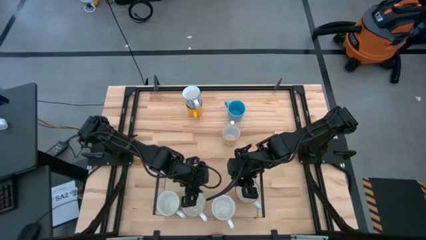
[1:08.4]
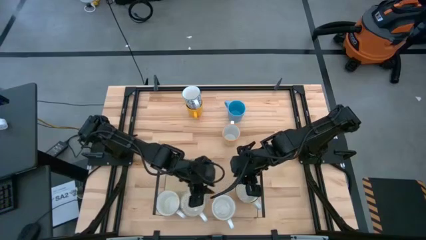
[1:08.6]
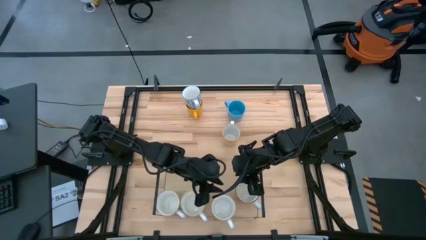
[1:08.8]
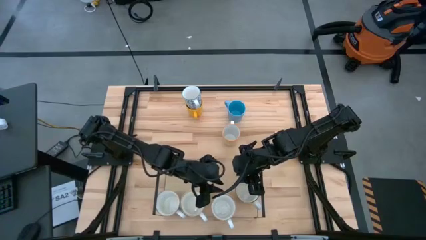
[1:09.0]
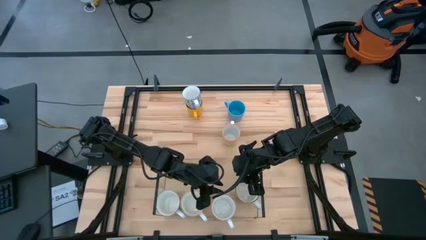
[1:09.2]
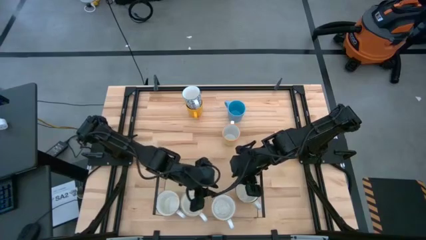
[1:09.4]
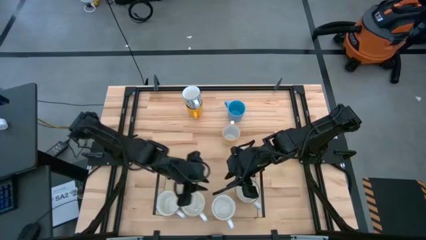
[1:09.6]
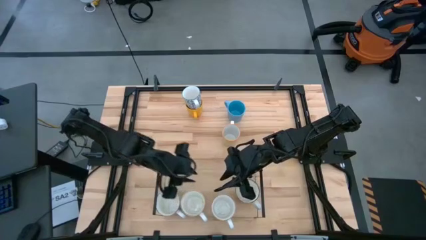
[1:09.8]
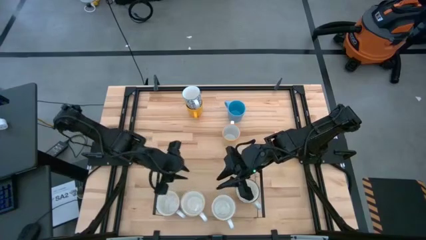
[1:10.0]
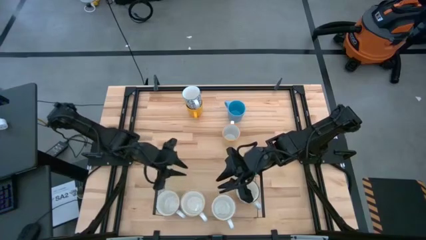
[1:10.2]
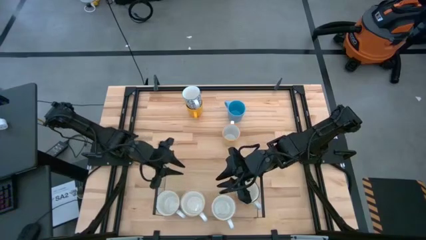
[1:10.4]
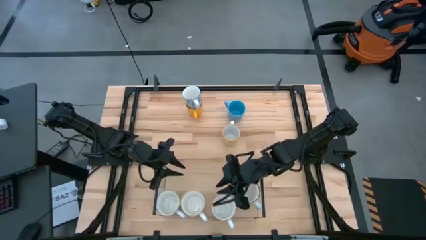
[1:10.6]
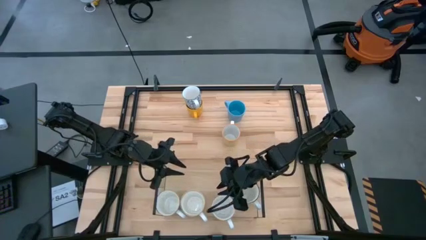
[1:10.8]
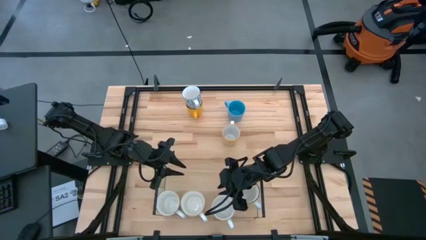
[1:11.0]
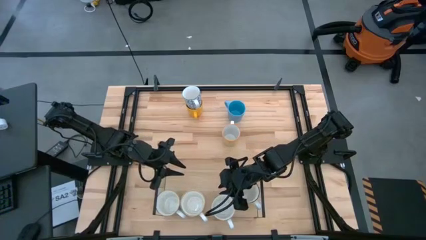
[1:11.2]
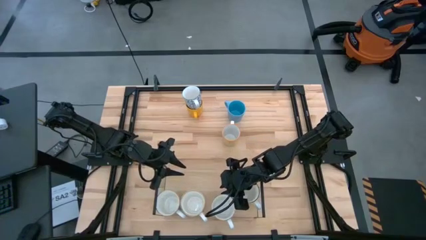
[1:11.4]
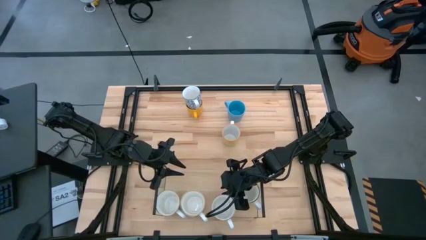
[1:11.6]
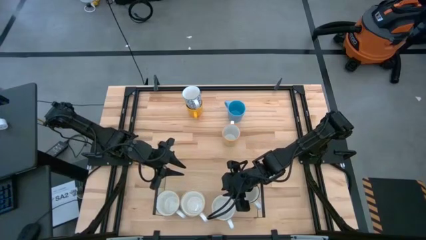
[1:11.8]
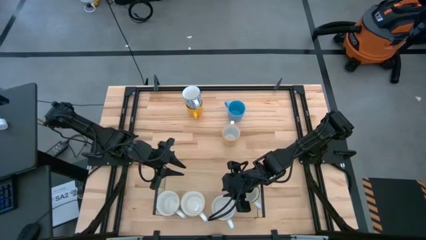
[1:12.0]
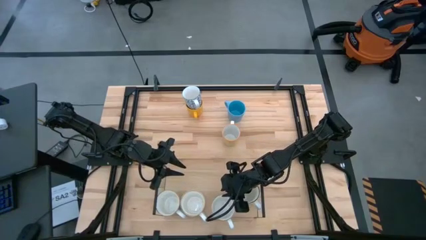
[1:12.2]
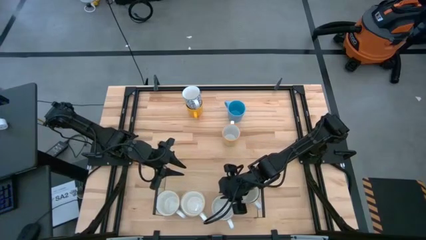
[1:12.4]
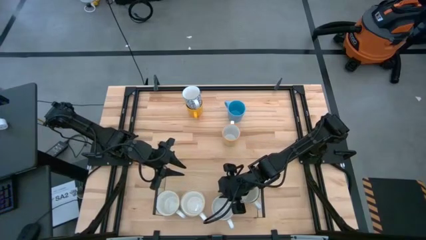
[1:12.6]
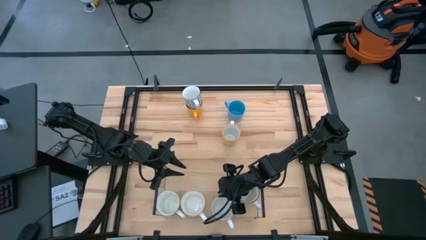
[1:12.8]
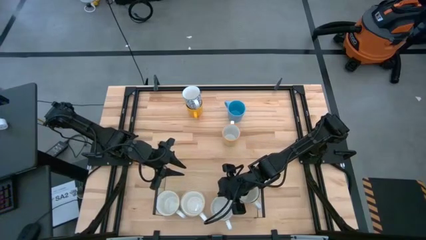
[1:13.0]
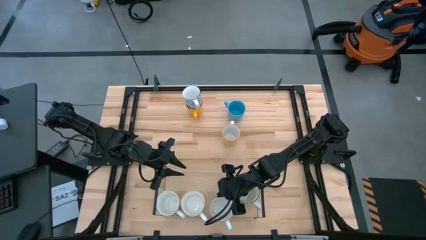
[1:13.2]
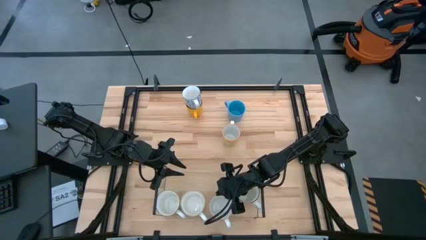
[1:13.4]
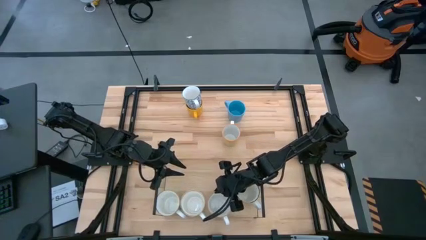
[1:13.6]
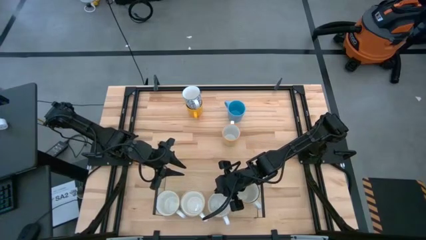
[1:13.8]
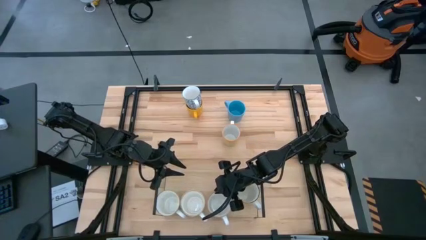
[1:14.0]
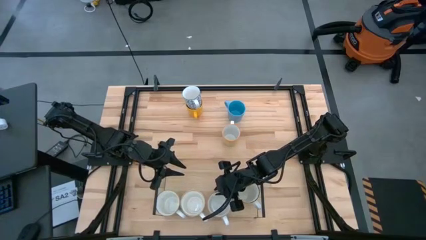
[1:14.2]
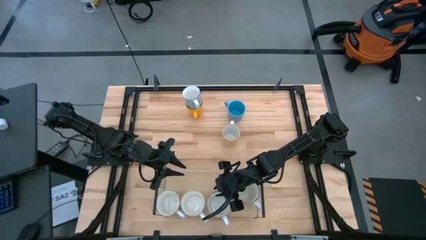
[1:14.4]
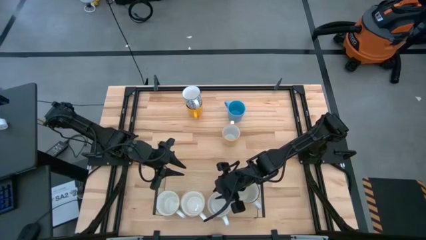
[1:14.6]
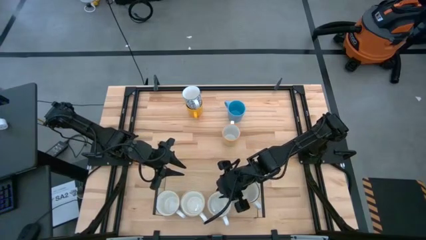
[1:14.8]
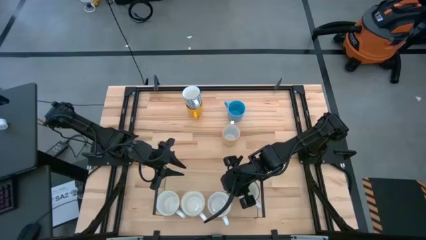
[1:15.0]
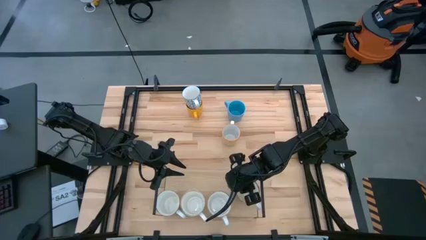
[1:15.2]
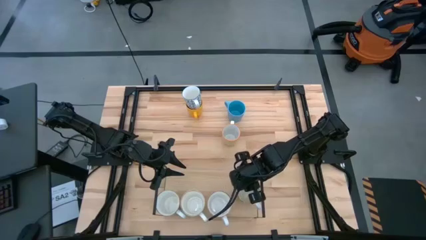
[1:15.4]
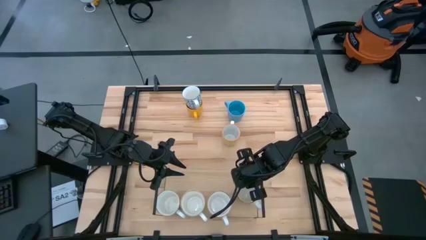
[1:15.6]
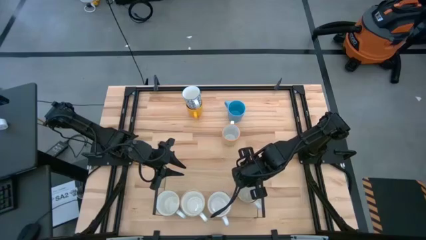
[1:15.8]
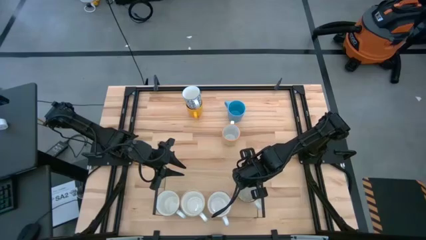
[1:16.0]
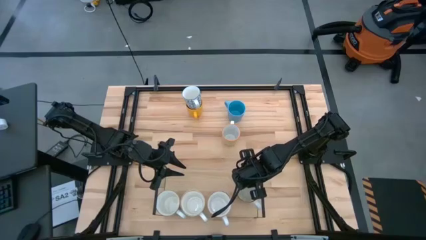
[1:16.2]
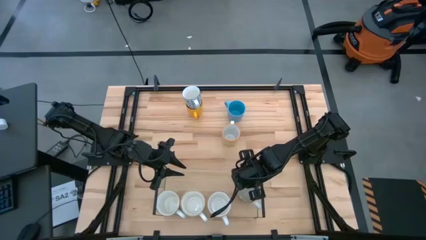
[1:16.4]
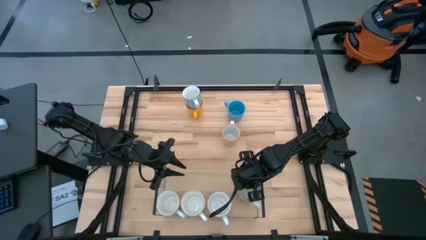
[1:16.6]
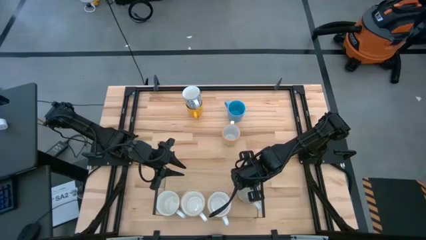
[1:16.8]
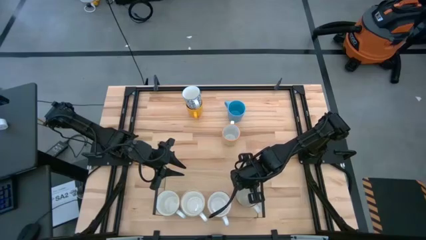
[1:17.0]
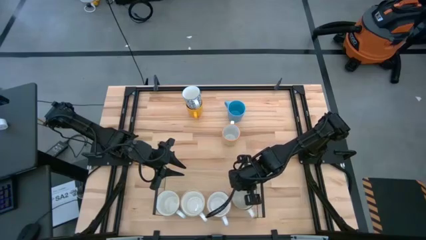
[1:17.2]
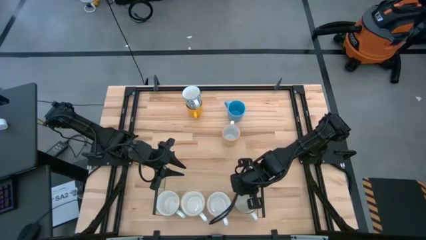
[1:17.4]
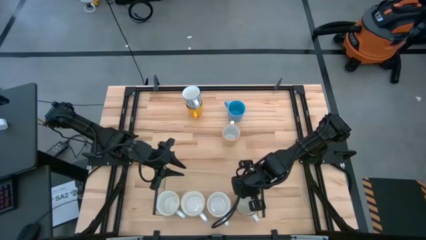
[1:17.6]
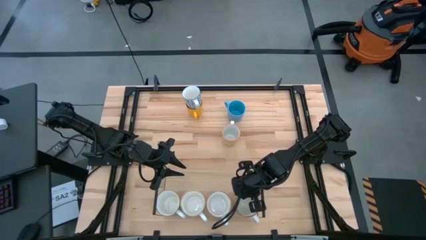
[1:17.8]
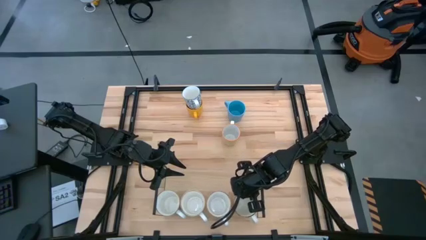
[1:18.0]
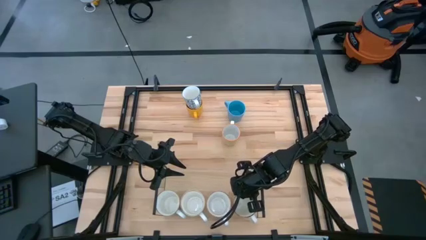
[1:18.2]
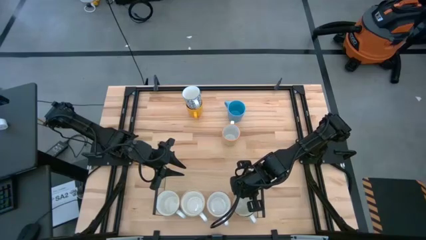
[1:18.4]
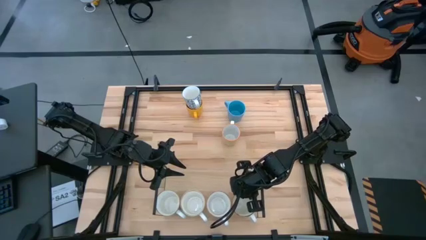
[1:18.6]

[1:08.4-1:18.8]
Task: Place coffee mugs
Adjust the mugs on the shelf
